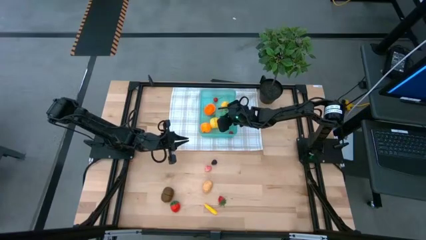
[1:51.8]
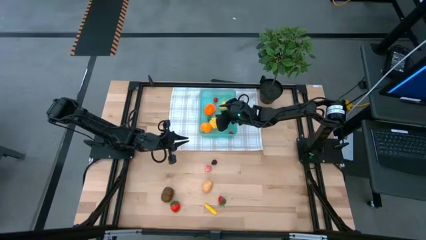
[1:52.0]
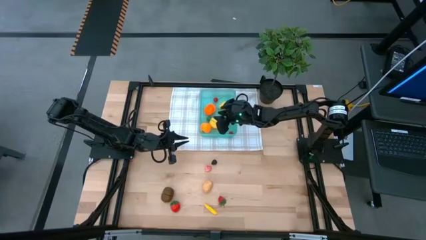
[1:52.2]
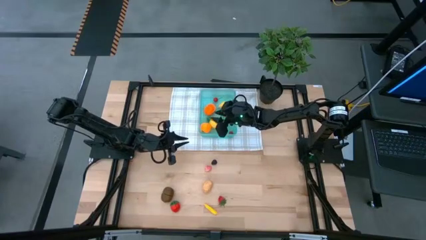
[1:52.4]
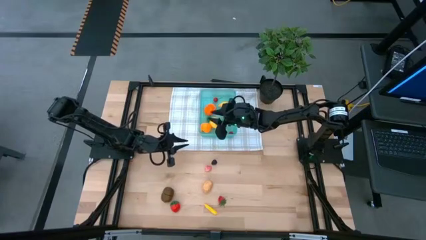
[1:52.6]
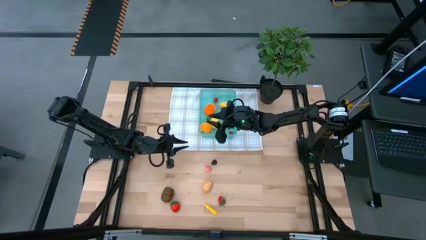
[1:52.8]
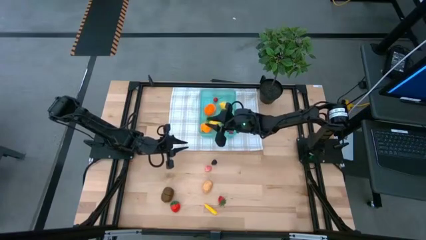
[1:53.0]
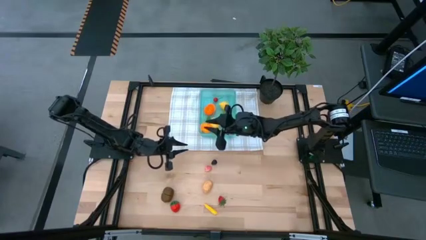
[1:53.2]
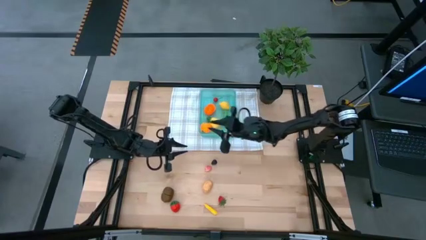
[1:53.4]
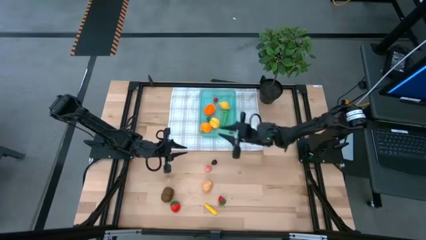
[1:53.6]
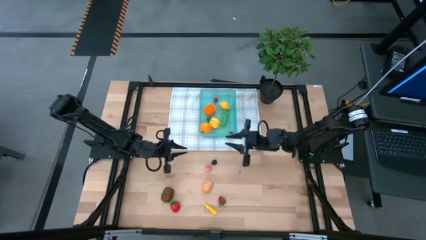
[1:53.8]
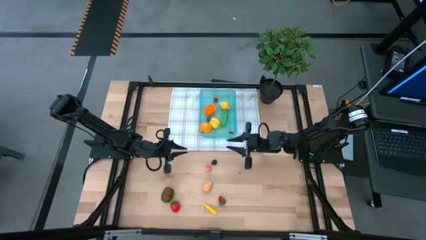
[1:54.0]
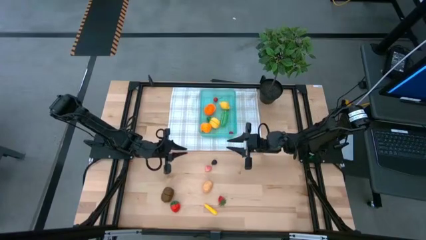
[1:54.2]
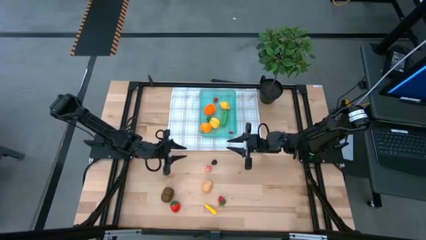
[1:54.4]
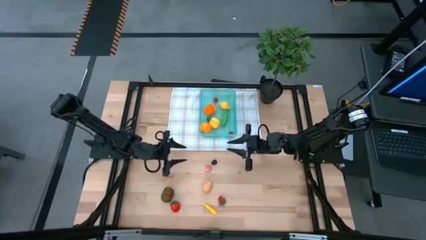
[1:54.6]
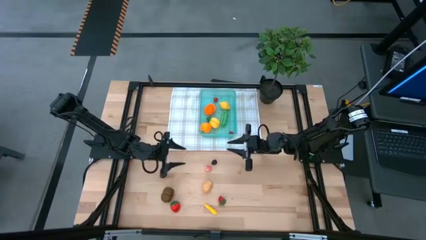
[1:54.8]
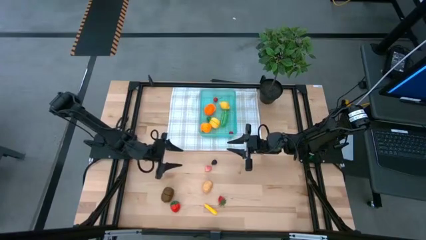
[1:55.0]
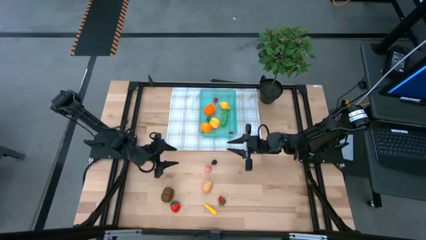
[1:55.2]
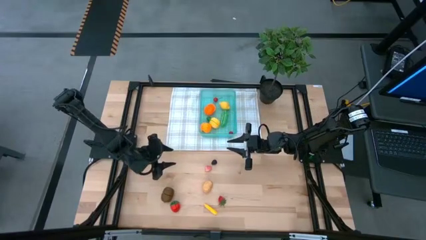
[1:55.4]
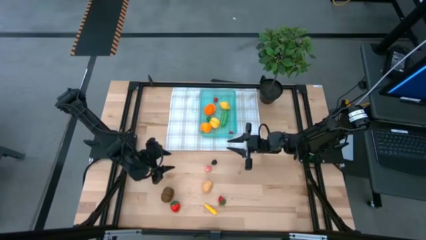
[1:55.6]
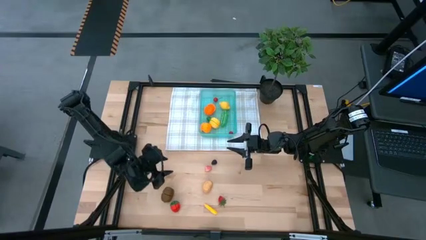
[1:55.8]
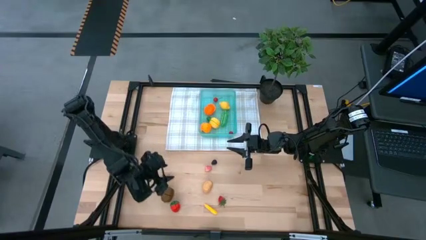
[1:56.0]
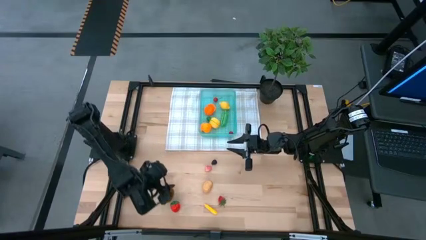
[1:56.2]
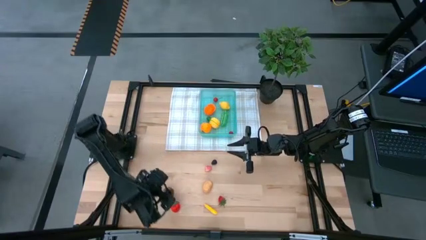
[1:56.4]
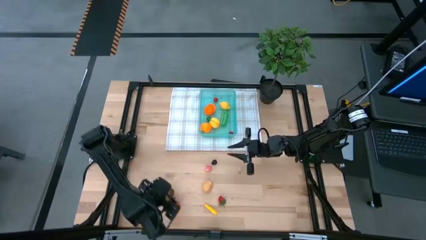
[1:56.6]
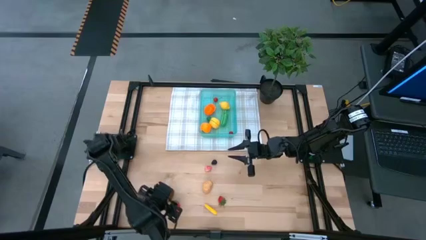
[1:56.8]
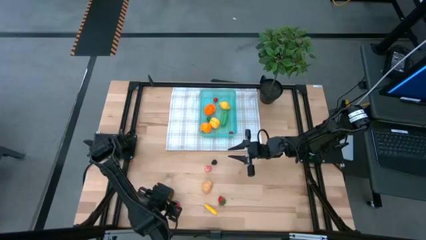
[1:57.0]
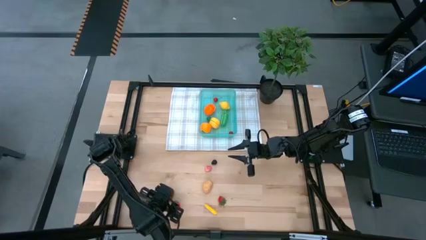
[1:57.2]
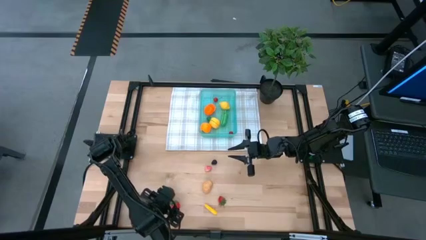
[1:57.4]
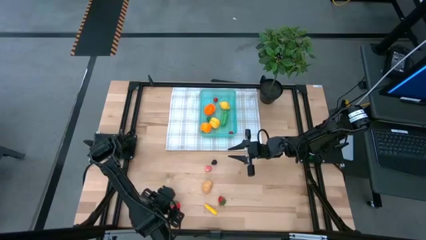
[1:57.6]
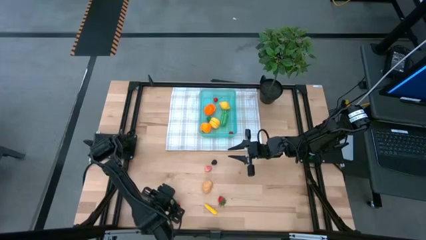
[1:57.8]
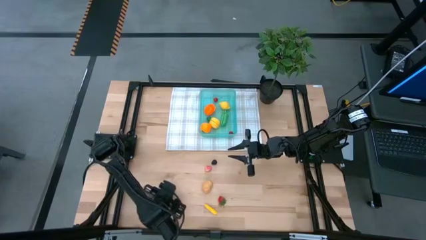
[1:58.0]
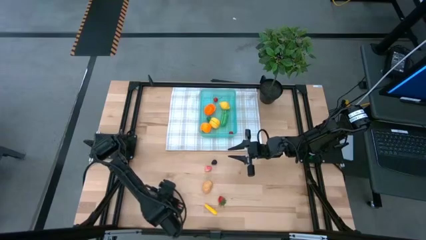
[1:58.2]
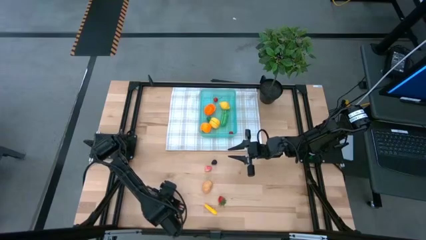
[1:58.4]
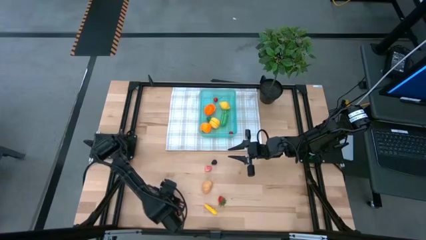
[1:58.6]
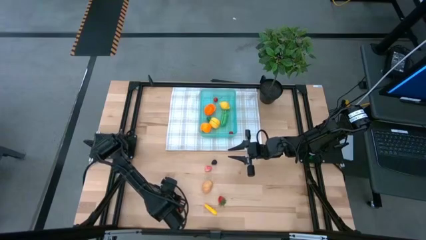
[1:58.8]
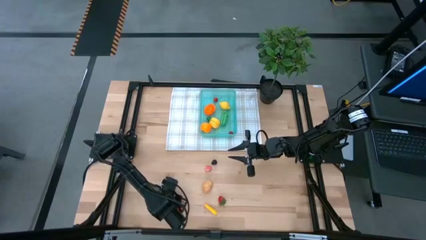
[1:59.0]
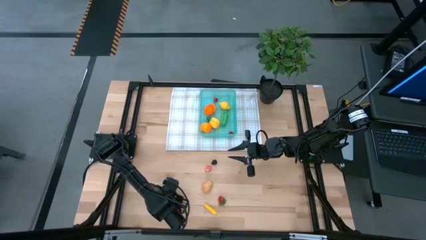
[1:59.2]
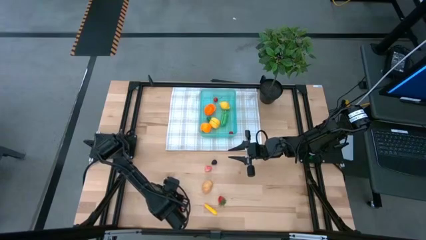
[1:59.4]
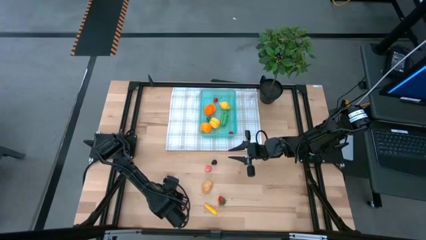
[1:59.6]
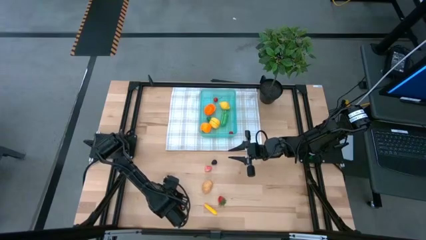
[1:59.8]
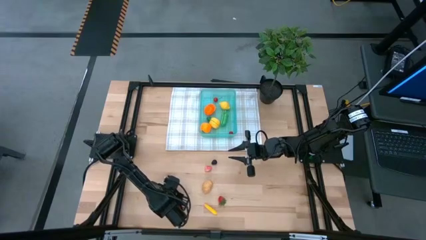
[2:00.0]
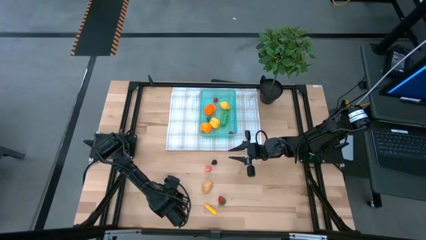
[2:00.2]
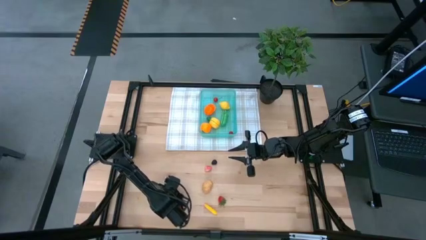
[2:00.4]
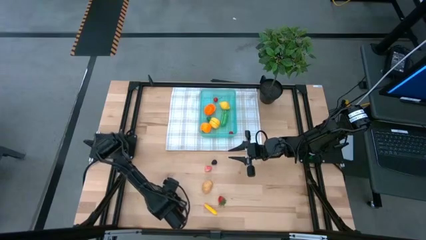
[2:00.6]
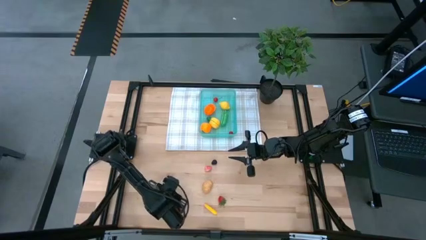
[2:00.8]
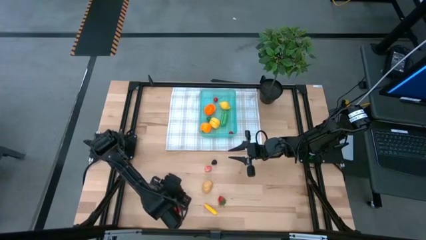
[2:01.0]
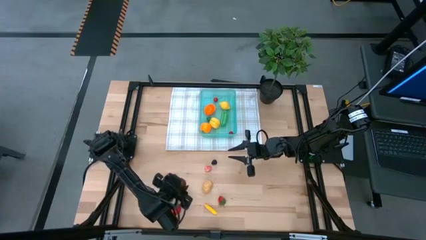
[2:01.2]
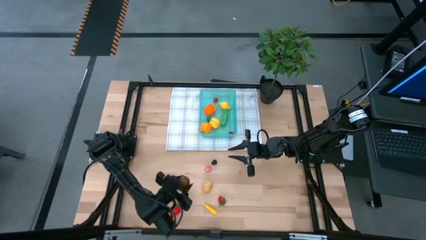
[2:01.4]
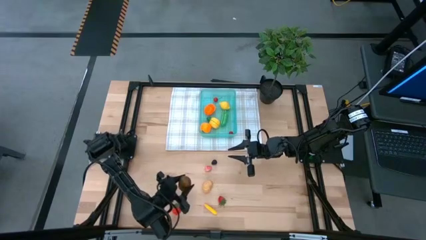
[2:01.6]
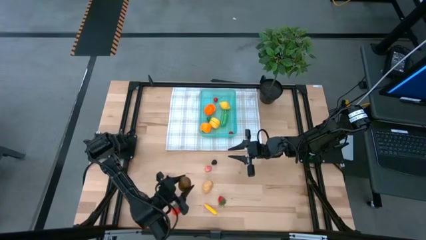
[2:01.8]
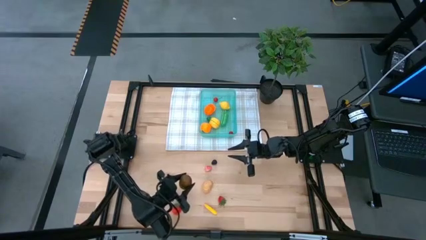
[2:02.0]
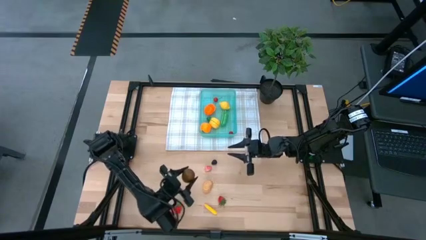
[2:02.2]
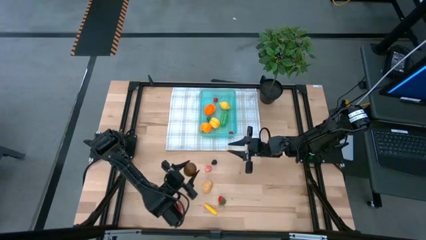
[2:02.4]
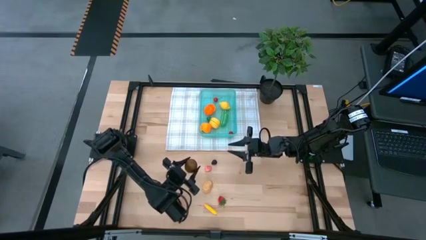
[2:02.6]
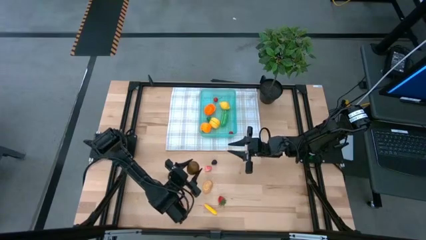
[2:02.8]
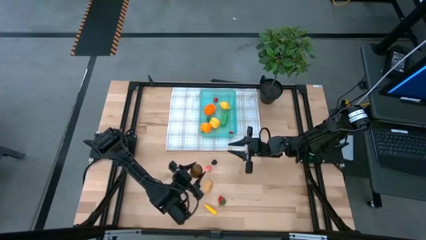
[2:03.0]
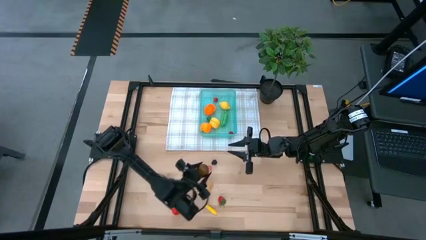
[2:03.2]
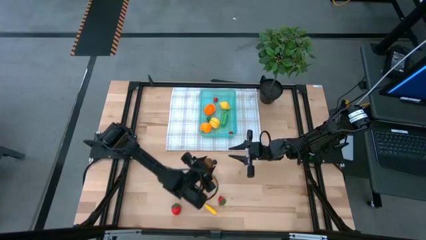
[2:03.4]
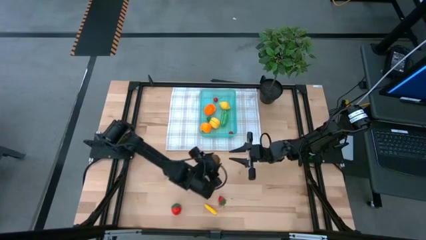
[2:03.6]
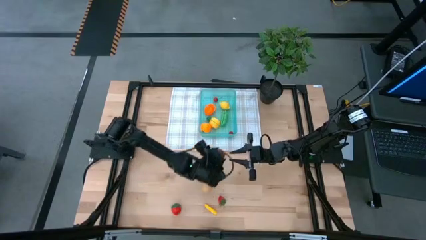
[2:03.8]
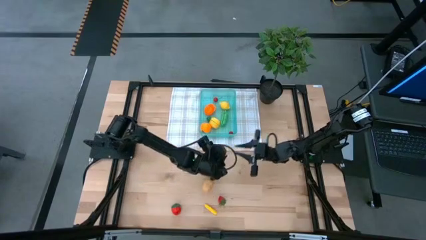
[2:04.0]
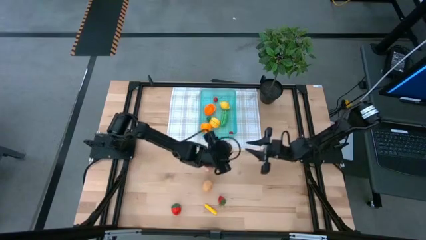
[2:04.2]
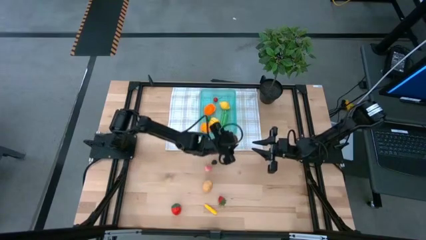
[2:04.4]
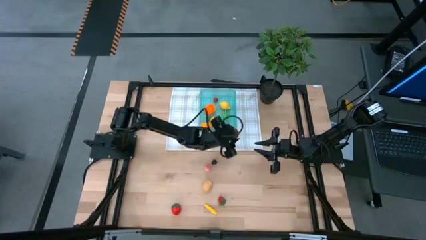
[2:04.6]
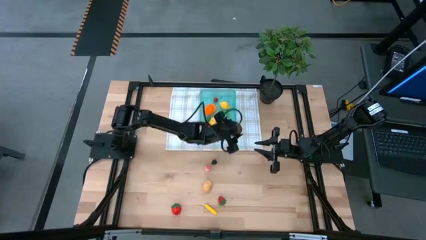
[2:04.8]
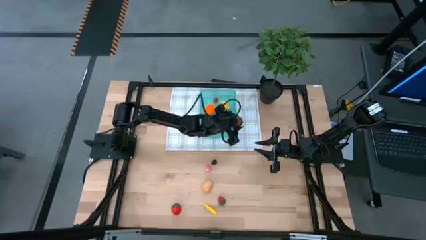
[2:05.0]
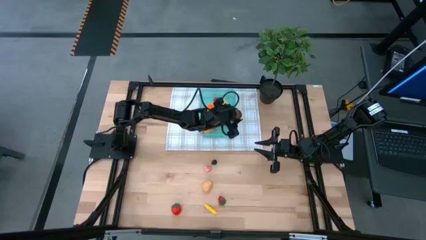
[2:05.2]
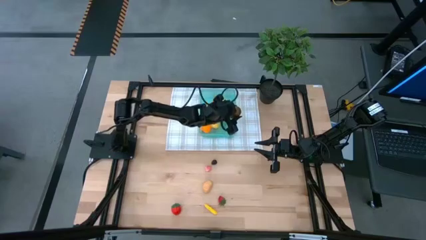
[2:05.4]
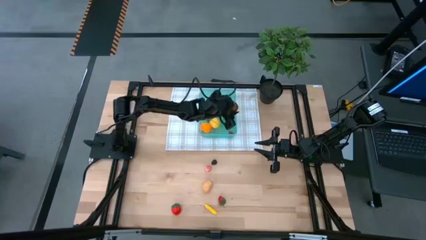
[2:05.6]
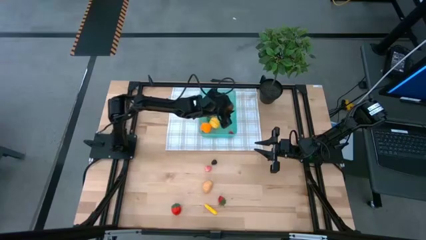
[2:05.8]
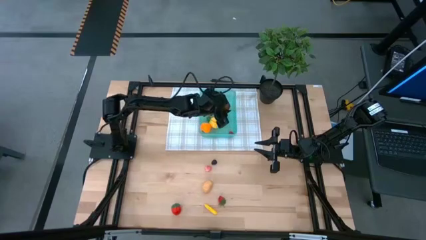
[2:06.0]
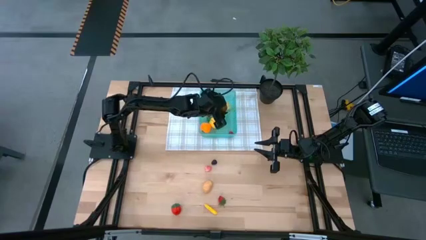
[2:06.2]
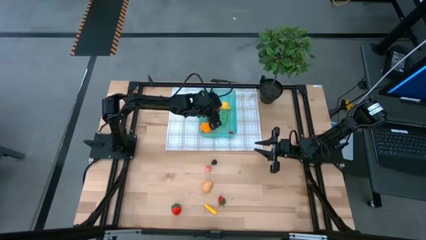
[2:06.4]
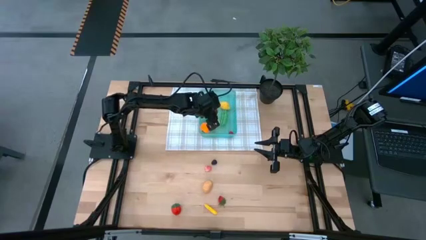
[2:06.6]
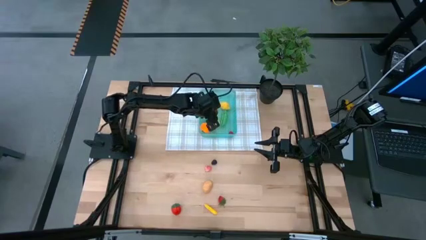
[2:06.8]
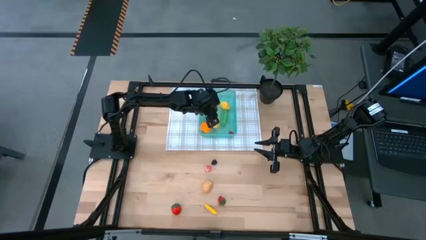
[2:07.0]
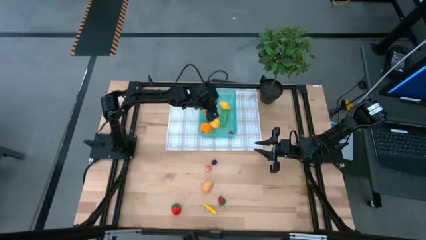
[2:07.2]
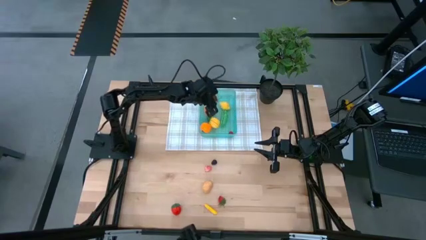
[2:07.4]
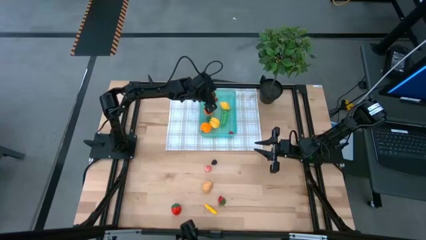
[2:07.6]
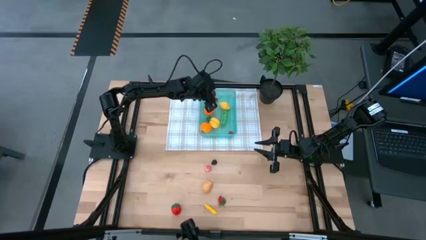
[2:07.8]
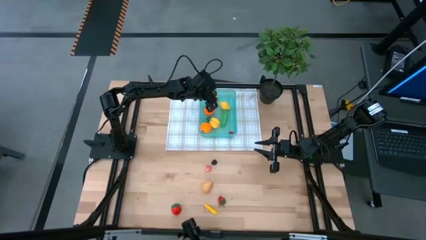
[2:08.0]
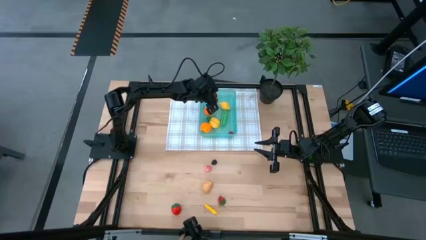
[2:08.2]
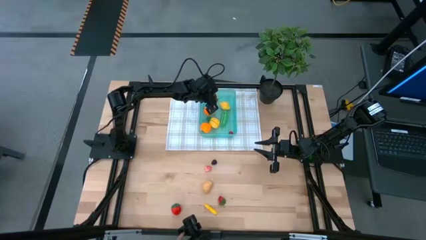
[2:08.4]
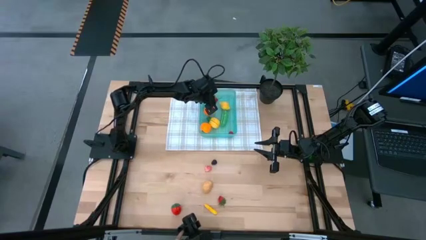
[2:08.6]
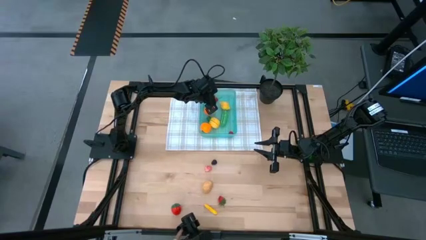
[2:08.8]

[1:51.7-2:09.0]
Task: Pick and placing Produce into tupperware
Put the brown kiwi into the green bin
